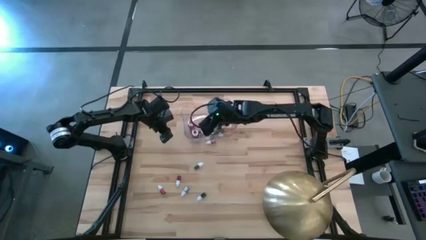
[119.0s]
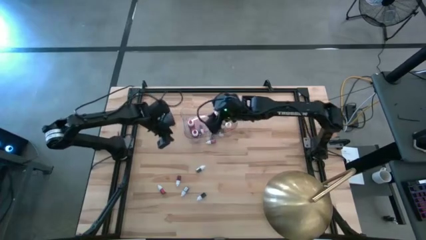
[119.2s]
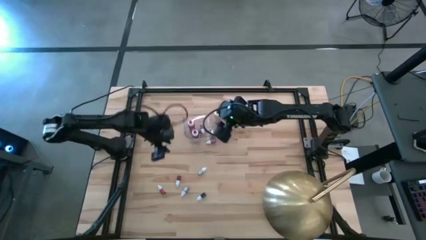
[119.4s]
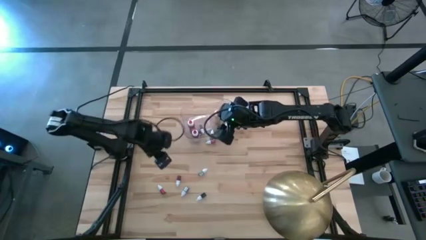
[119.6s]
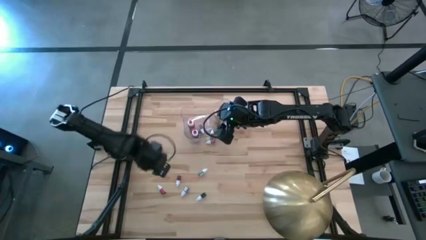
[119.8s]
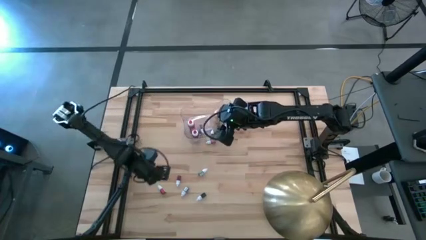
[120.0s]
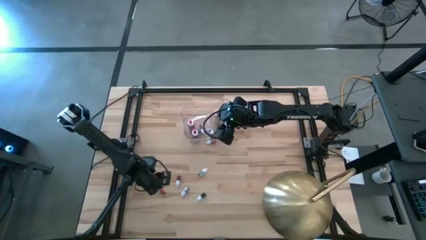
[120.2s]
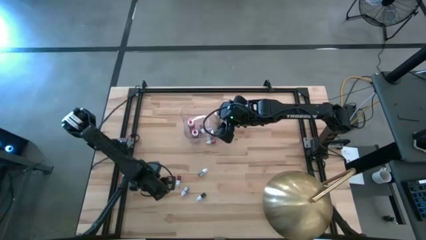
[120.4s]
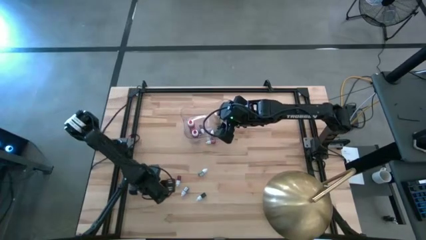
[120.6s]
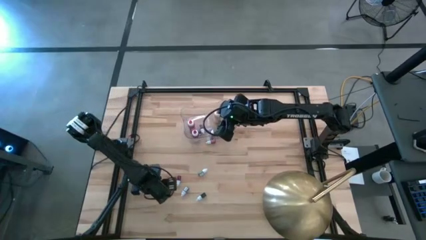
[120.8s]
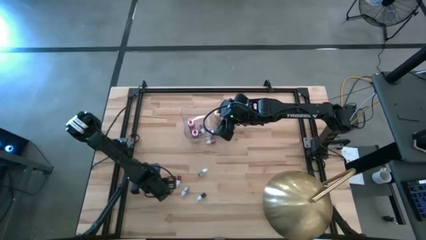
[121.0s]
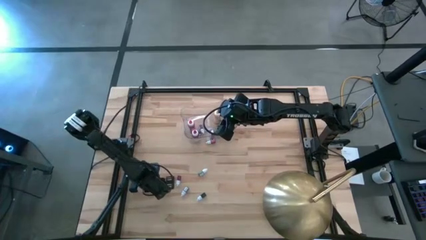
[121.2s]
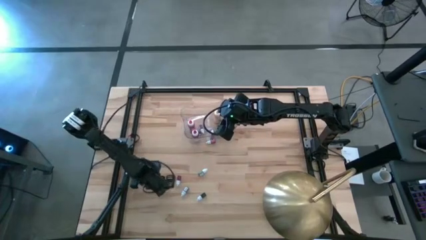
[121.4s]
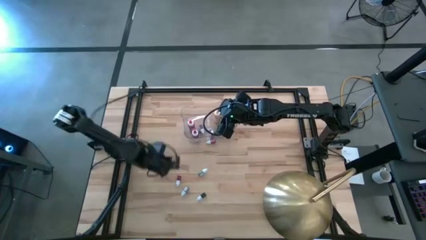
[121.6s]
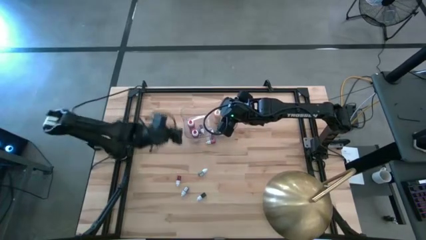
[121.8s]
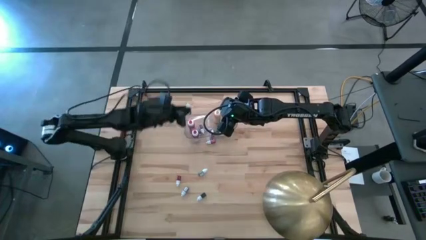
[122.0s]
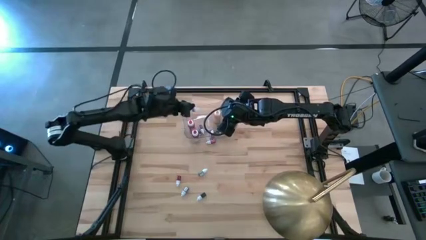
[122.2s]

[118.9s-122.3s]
Task: Pick & Place food coloring
Put the small red food coloring bottle in the transparent bin

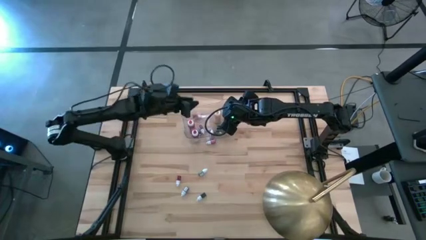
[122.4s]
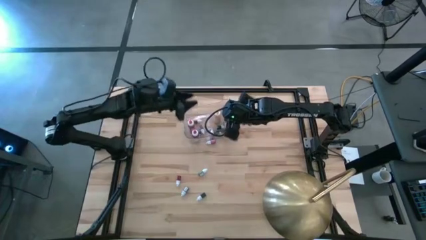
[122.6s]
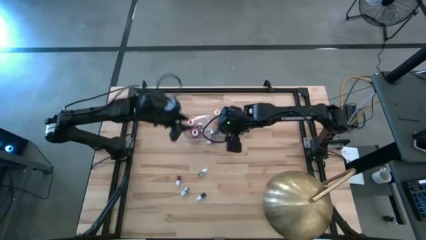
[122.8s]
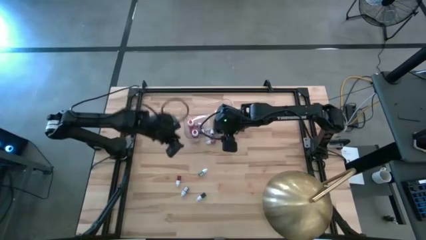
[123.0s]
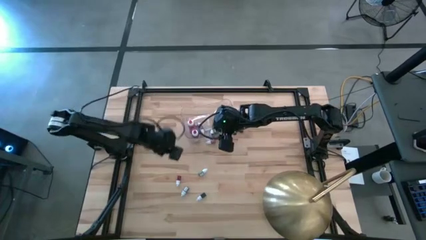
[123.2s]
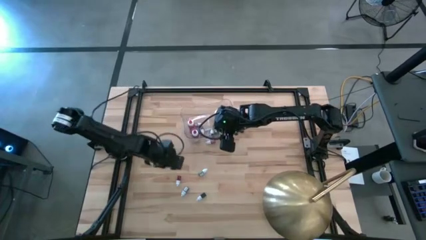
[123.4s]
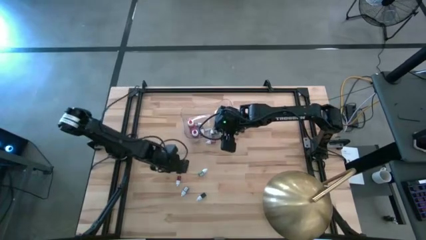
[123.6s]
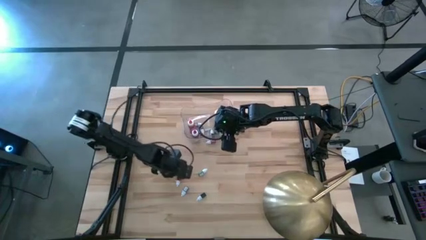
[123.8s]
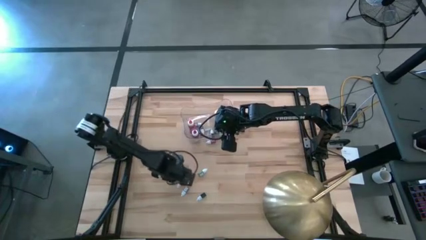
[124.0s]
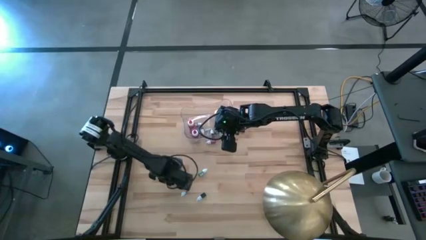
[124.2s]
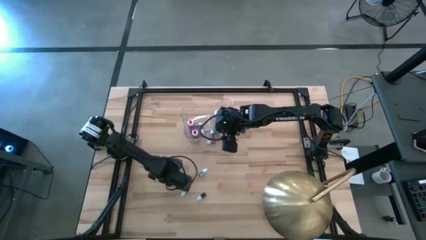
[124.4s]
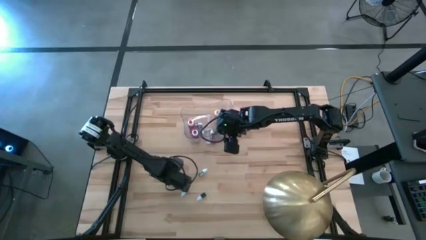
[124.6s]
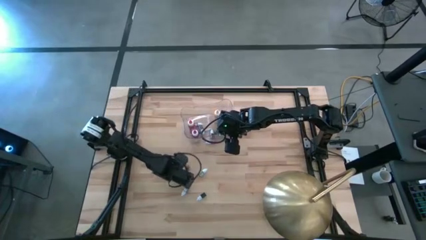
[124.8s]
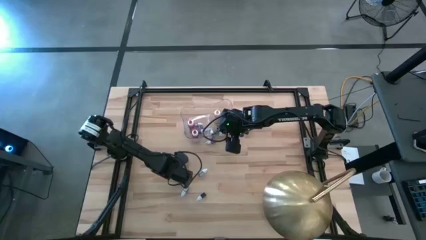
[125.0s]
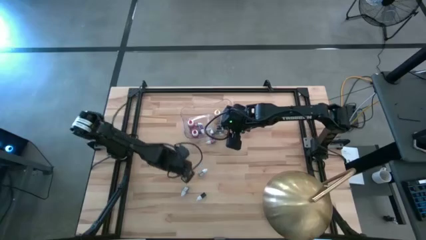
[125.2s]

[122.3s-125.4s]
Put the small orange food coloring bottle in the transparent bin

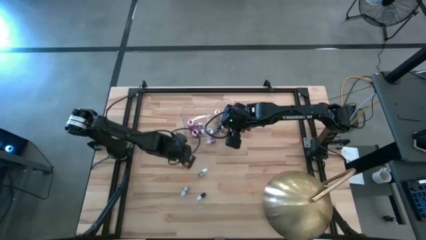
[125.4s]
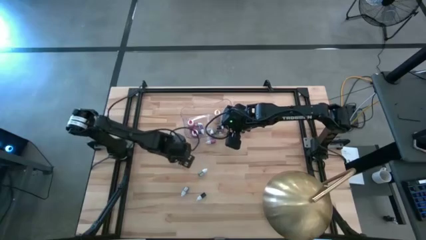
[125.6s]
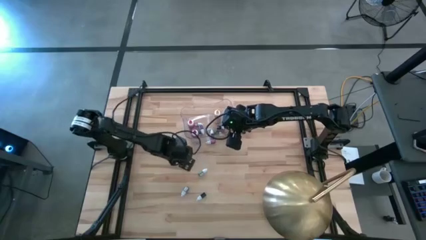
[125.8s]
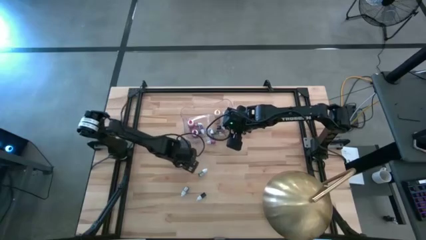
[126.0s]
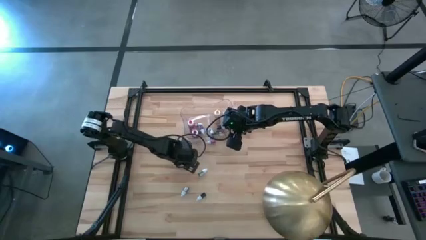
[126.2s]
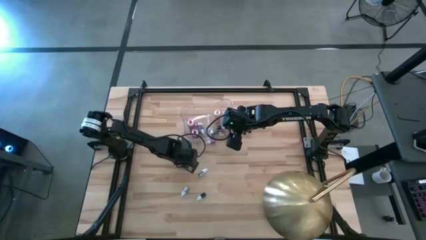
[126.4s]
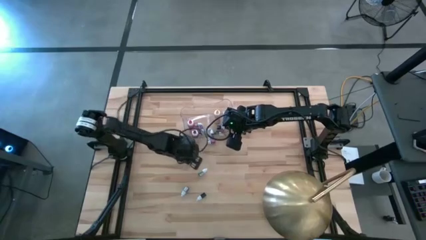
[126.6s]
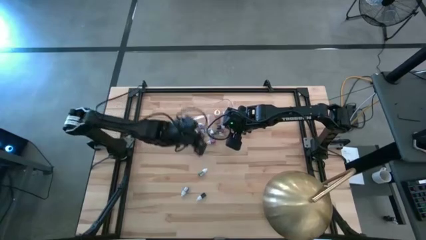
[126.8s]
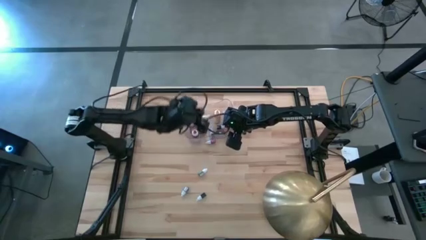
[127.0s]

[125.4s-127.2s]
Put the small orange food coloring bottle in the transparent bin

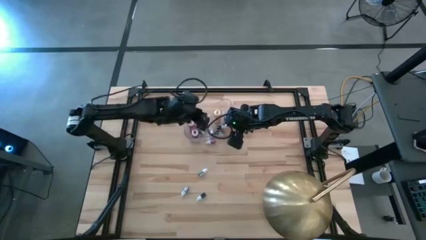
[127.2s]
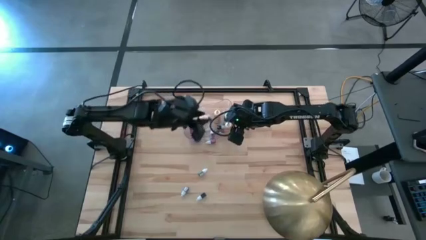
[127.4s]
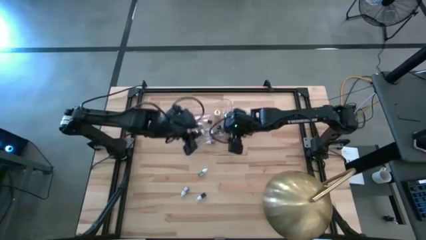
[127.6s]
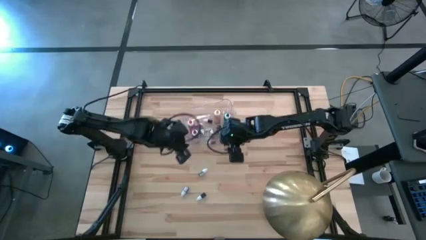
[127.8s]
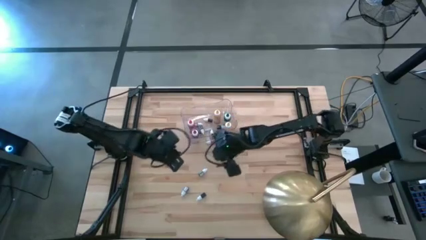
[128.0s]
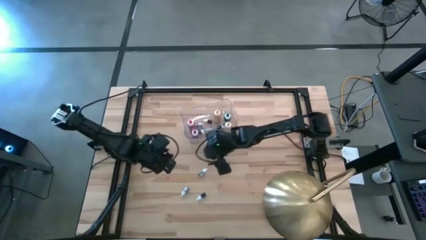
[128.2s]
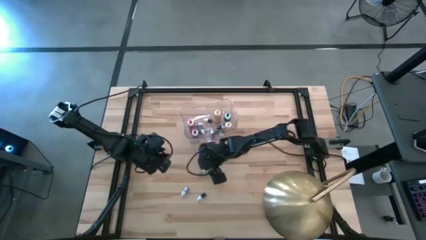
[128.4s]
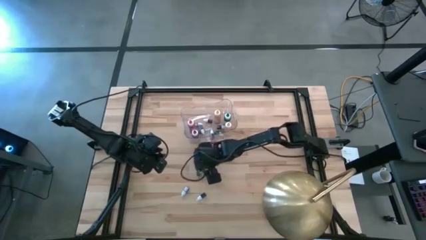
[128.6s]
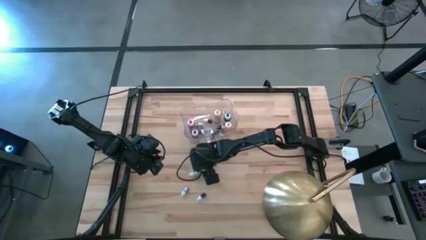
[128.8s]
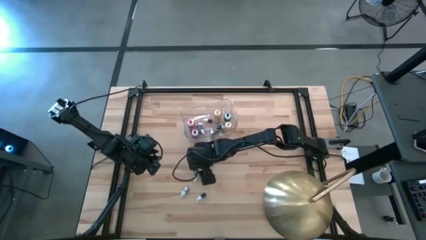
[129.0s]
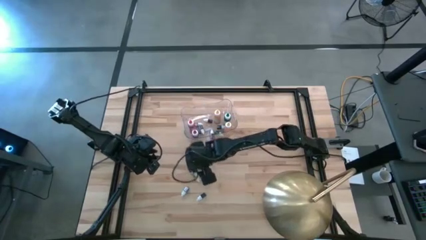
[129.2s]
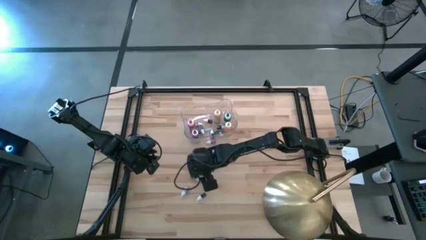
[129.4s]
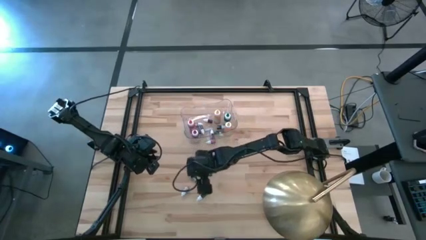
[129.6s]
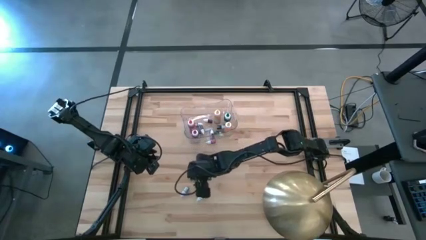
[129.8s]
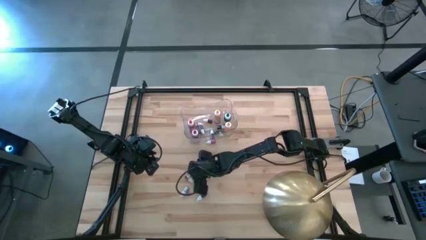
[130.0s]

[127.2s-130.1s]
Put the small green food coloring bottle in the transparent bin

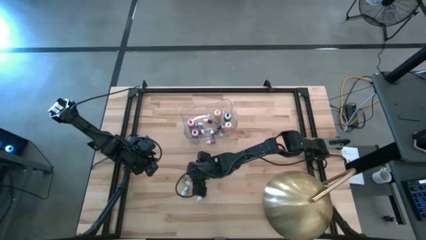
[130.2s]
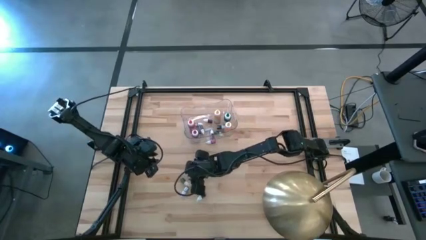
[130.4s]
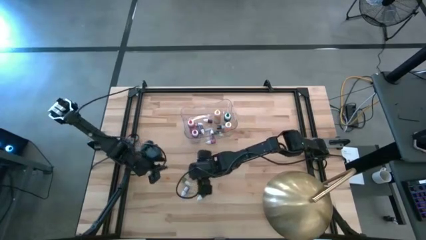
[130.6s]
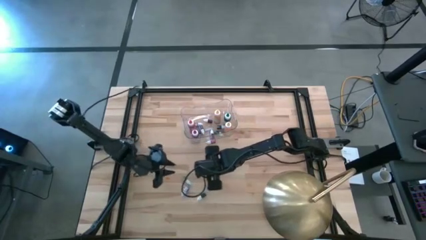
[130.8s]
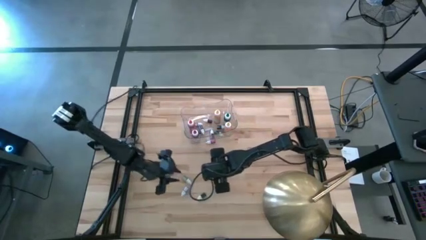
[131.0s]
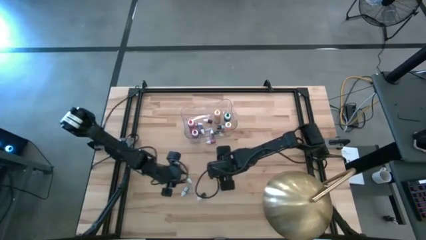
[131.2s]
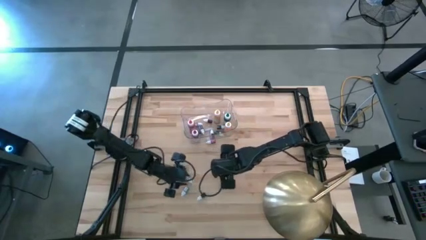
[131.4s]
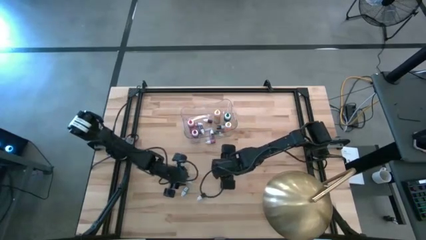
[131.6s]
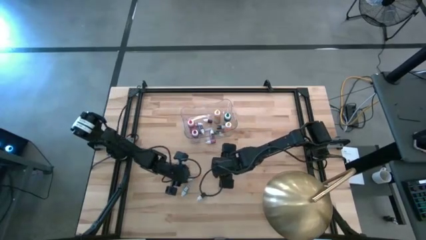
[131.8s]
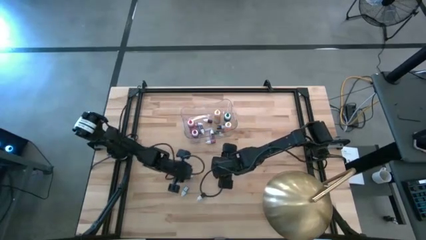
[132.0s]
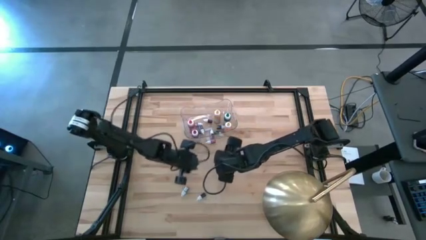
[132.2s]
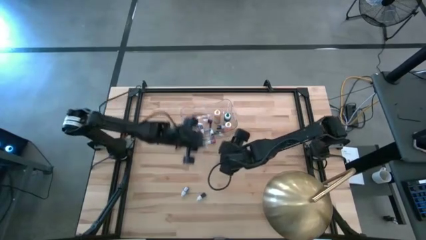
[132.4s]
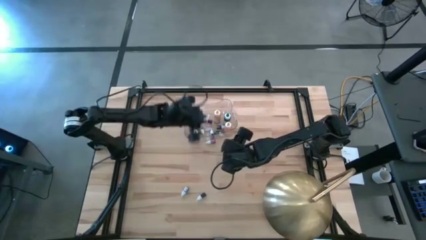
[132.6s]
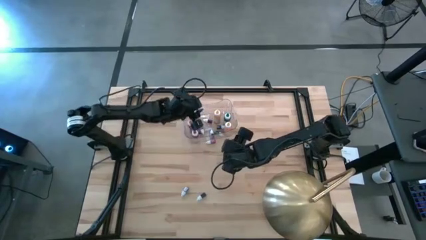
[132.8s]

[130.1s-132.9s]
Put the small green food coloring bottle in the transparent bin

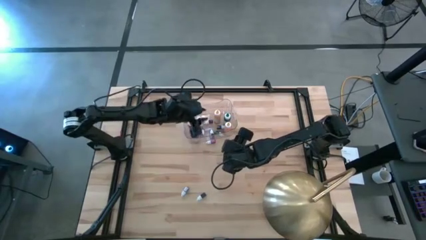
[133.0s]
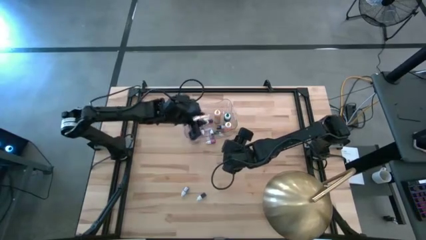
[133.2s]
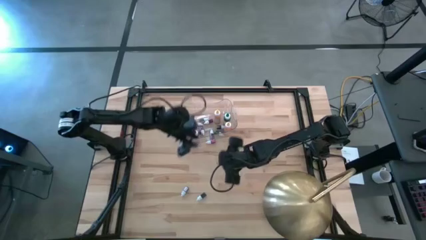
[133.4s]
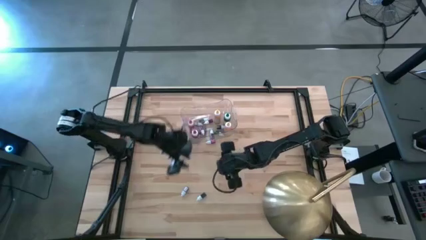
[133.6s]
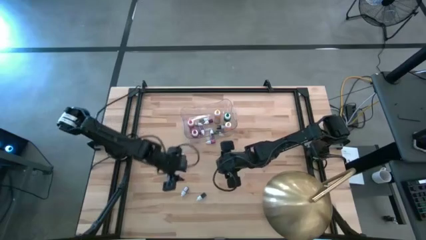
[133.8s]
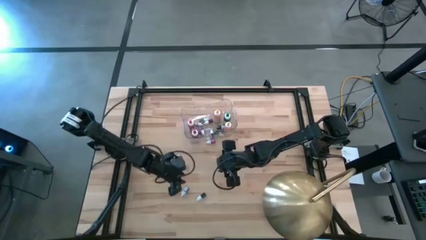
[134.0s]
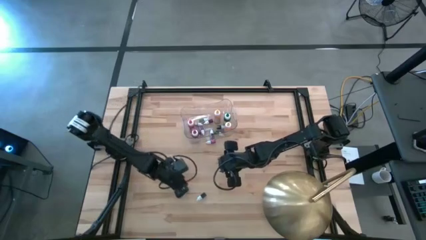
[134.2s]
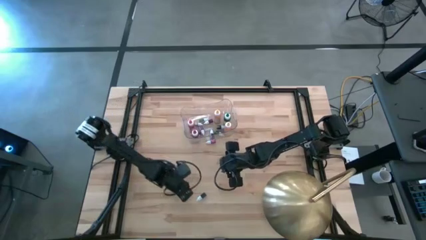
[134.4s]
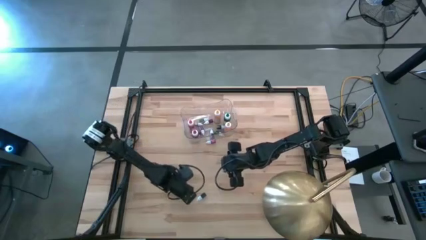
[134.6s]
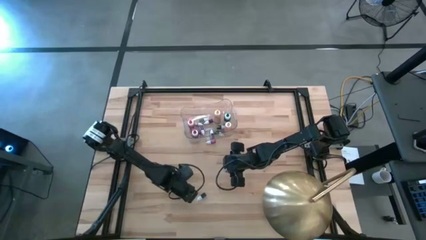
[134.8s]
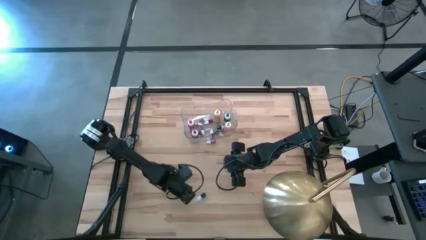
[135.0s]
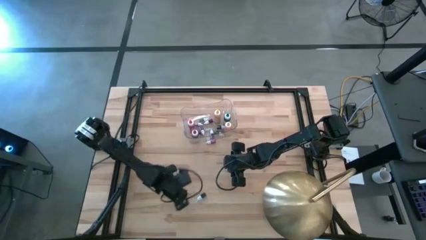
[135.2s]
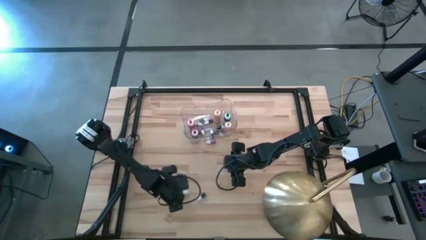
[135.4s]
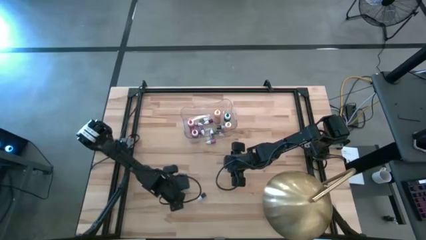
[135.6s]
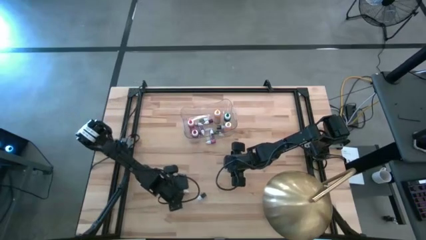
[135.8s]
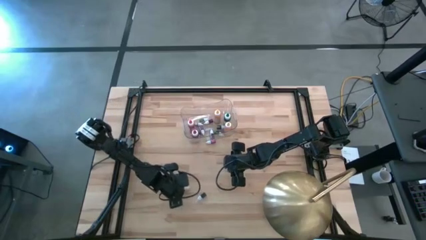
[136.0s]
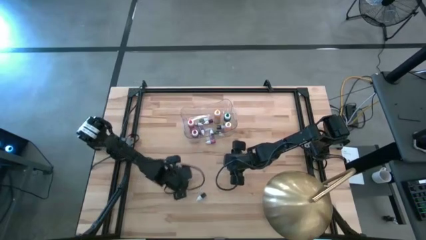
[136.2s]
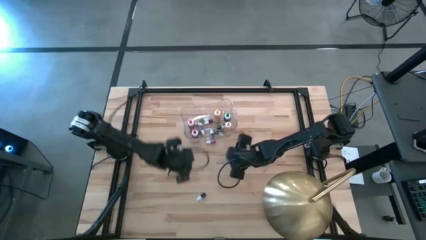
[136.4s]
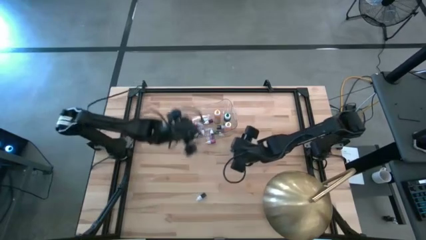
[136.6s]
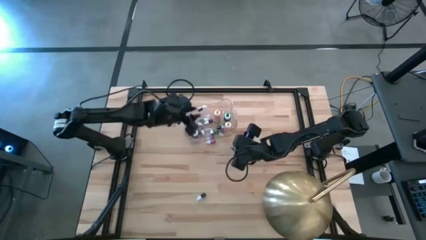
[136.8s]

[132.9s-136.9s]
Put the left small blue food coloring bottle in the transparent bin
